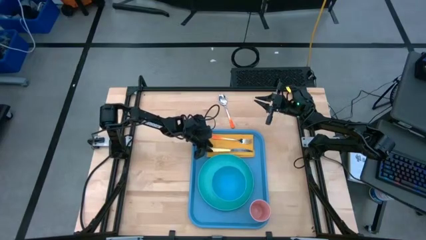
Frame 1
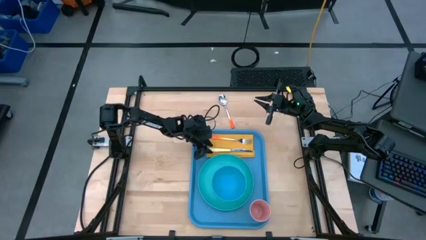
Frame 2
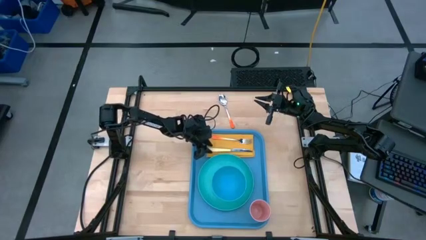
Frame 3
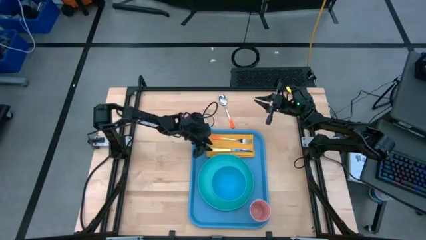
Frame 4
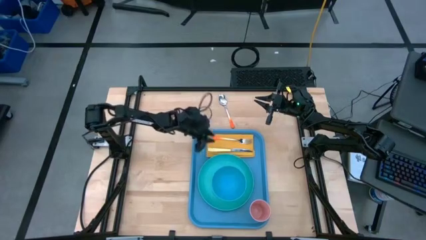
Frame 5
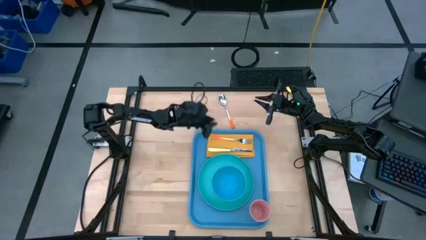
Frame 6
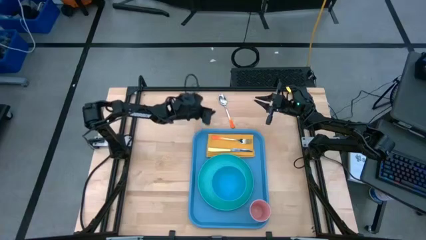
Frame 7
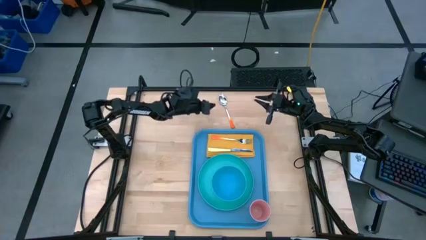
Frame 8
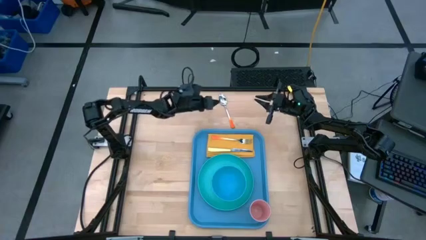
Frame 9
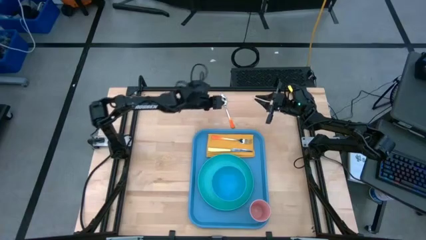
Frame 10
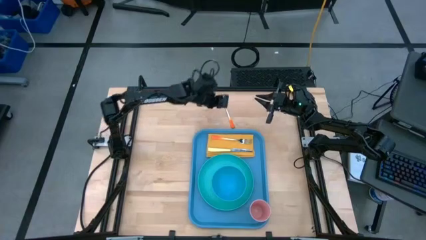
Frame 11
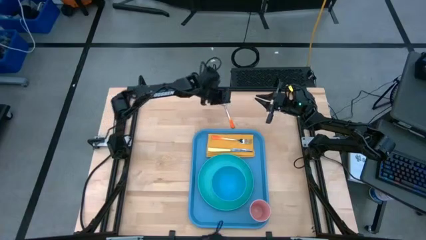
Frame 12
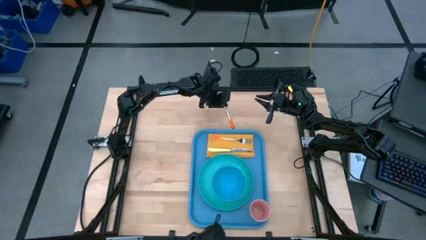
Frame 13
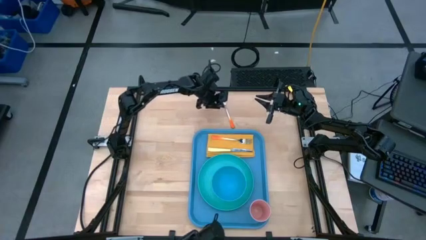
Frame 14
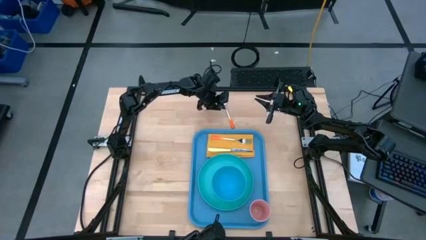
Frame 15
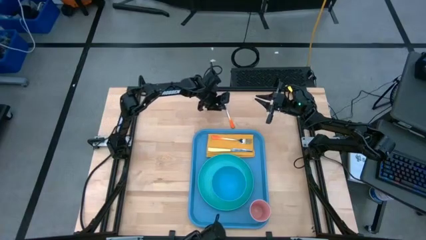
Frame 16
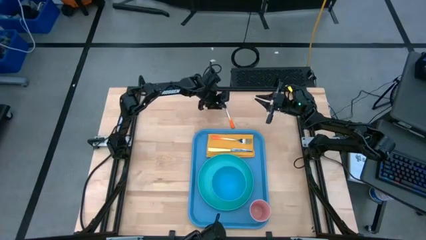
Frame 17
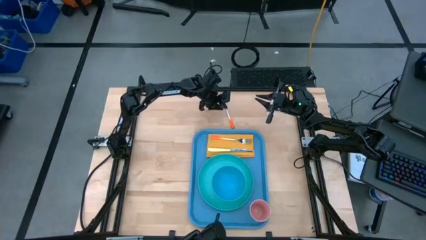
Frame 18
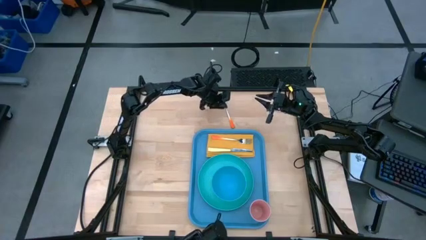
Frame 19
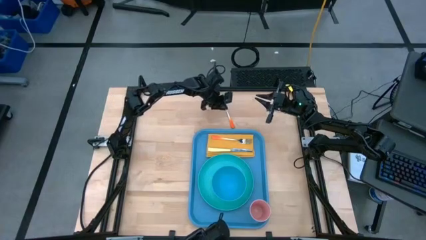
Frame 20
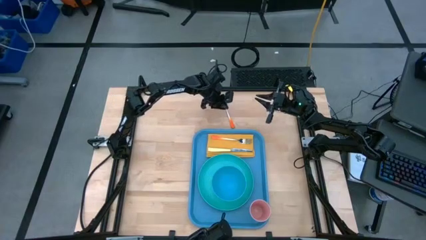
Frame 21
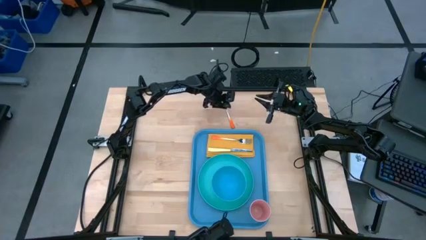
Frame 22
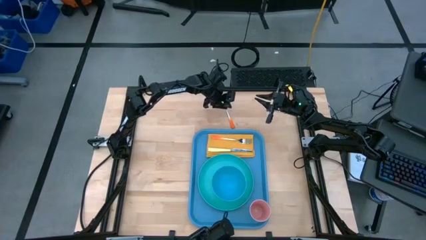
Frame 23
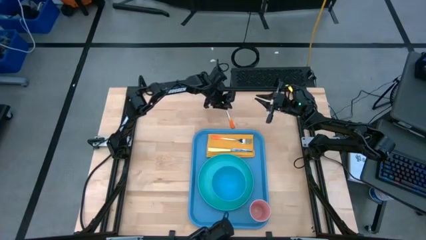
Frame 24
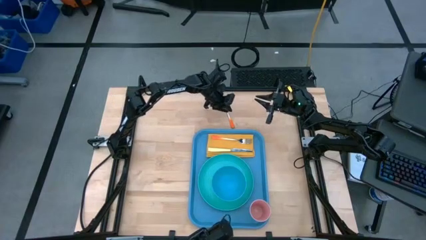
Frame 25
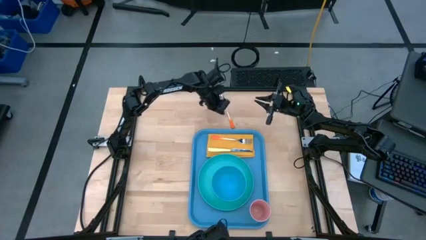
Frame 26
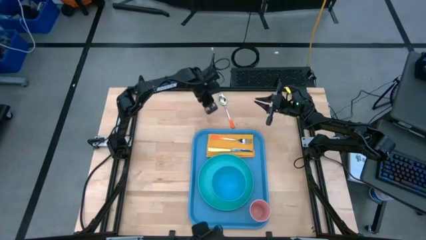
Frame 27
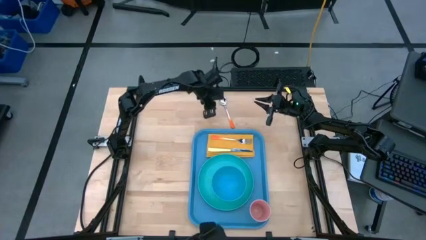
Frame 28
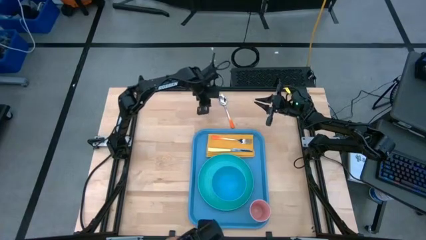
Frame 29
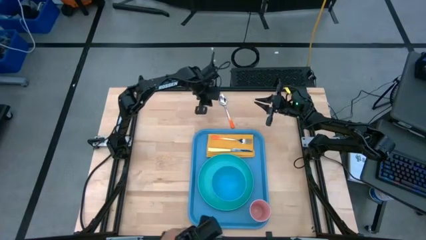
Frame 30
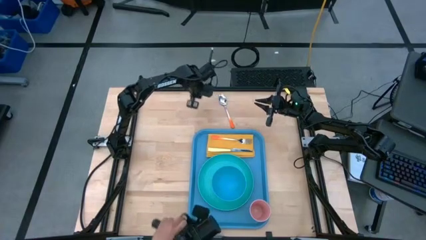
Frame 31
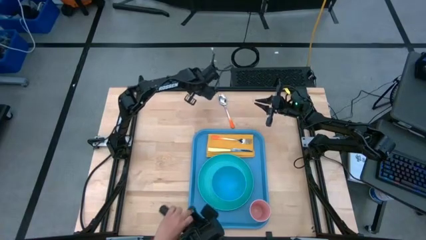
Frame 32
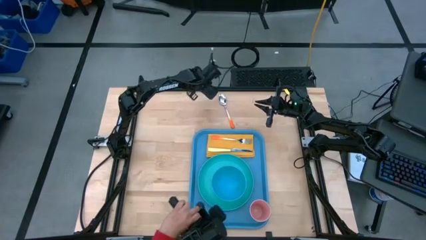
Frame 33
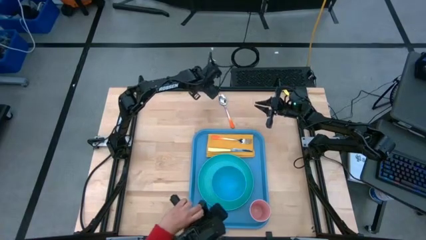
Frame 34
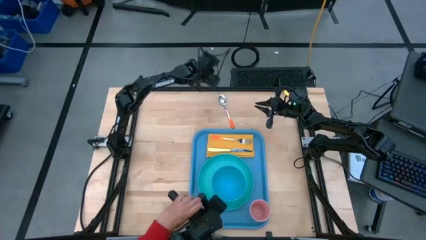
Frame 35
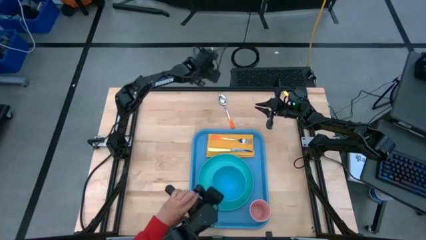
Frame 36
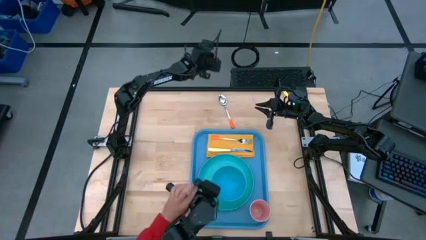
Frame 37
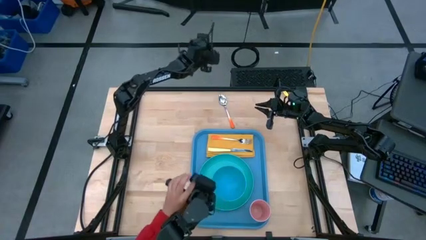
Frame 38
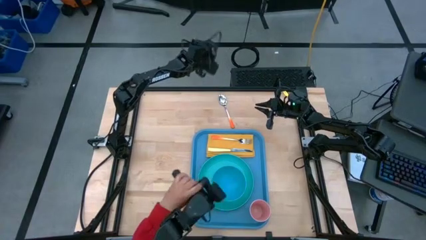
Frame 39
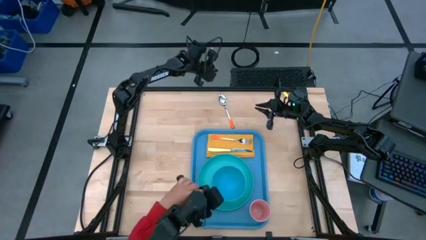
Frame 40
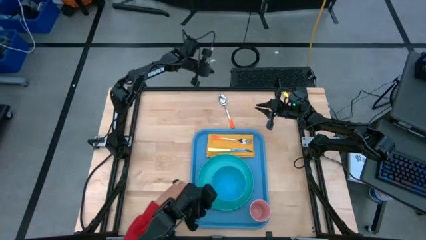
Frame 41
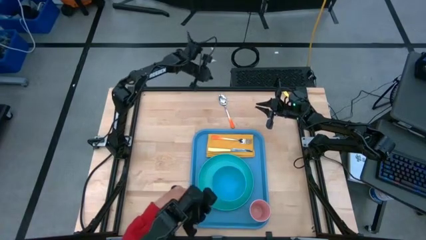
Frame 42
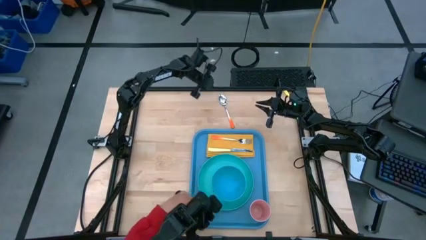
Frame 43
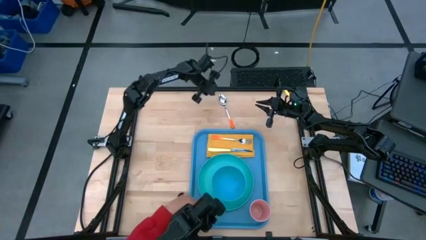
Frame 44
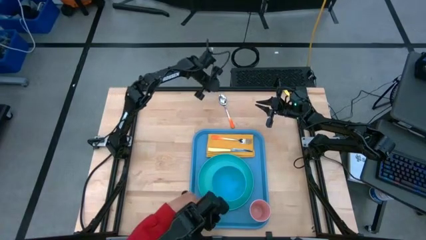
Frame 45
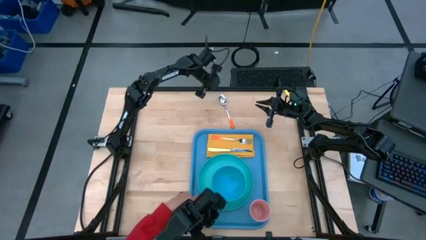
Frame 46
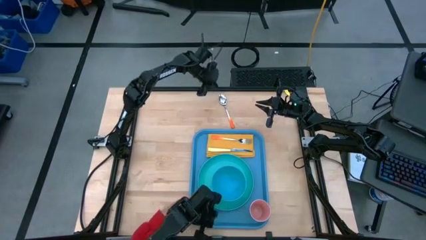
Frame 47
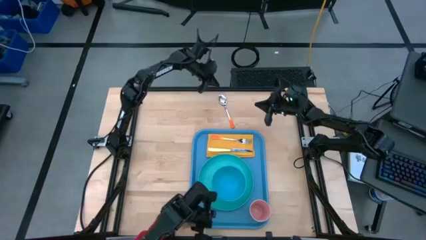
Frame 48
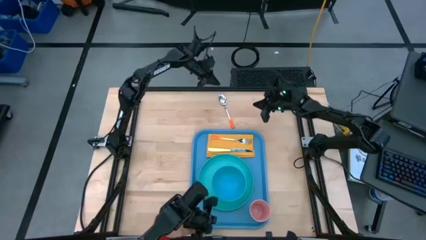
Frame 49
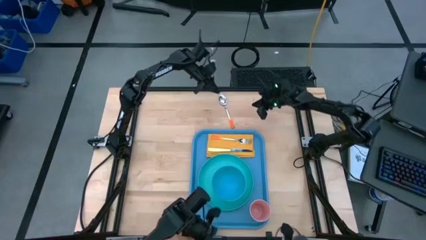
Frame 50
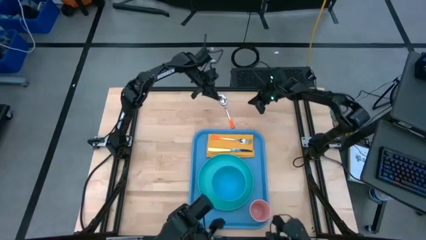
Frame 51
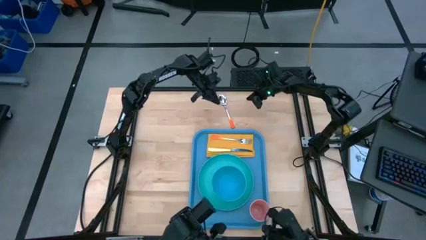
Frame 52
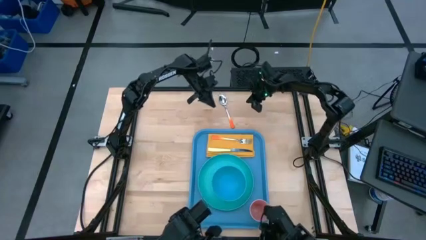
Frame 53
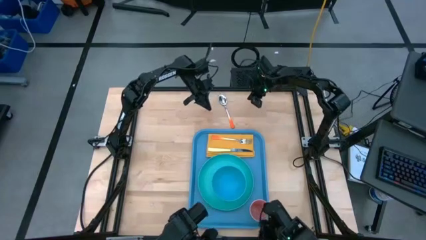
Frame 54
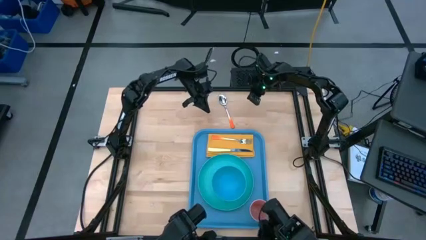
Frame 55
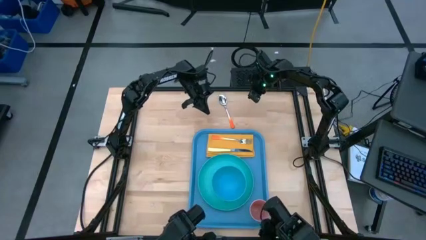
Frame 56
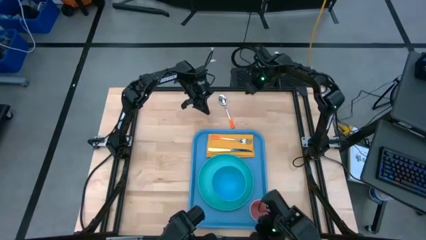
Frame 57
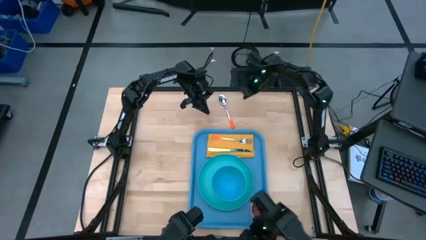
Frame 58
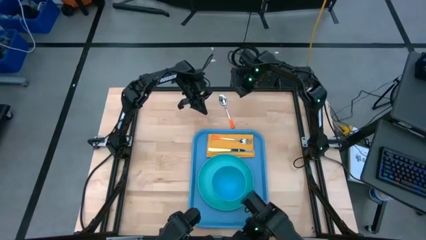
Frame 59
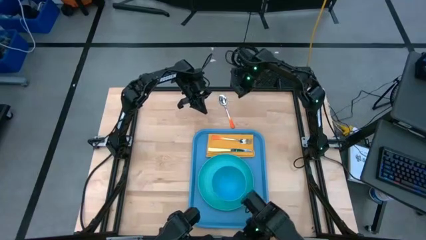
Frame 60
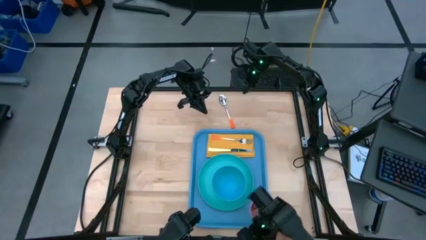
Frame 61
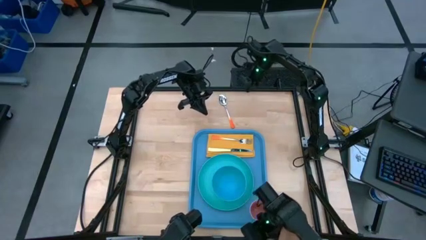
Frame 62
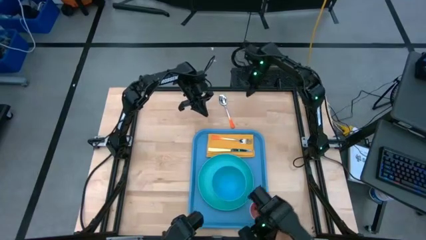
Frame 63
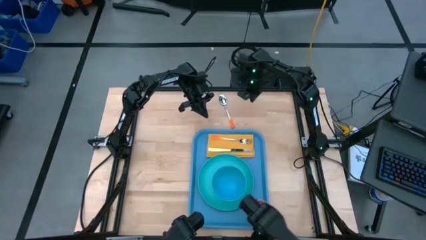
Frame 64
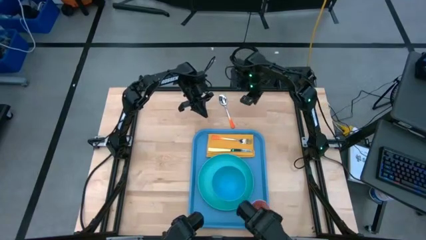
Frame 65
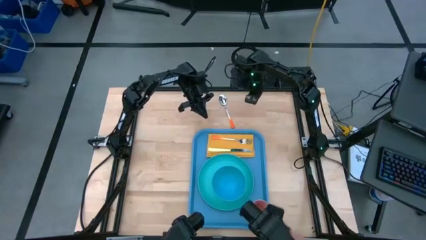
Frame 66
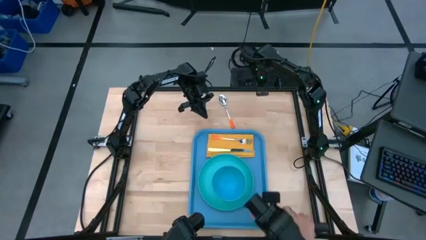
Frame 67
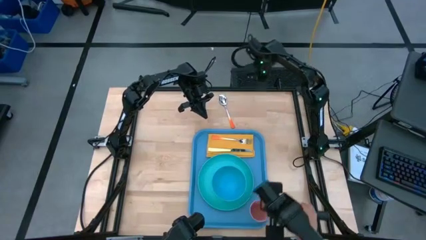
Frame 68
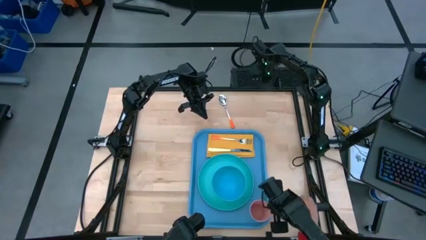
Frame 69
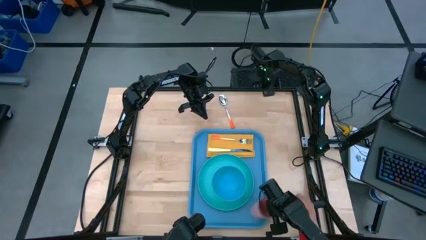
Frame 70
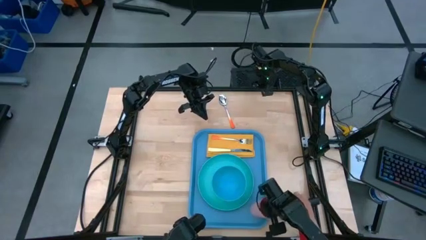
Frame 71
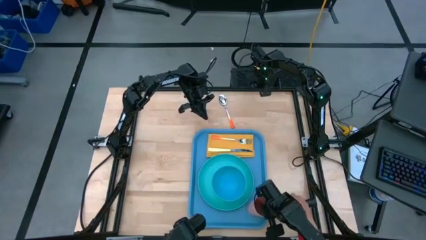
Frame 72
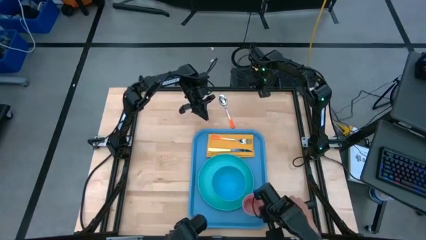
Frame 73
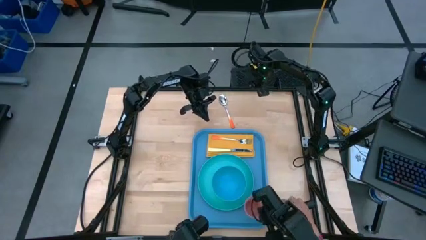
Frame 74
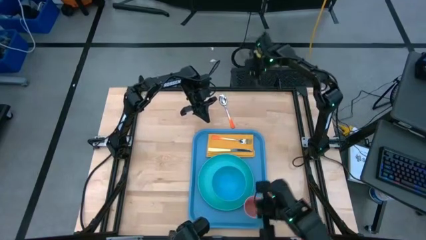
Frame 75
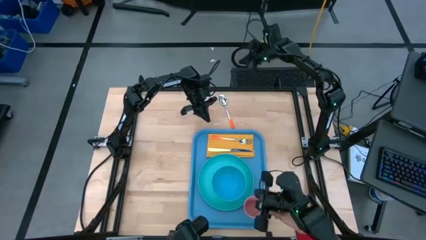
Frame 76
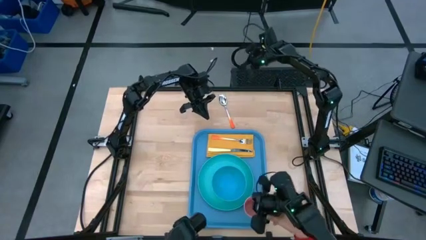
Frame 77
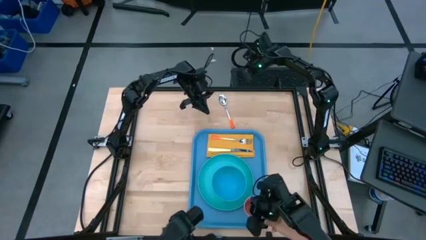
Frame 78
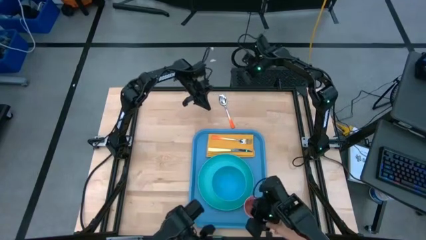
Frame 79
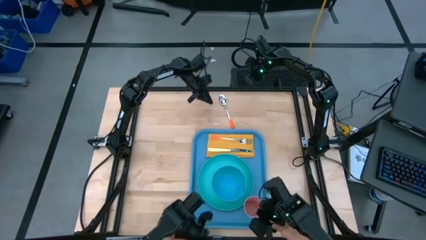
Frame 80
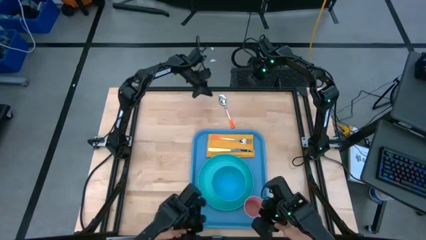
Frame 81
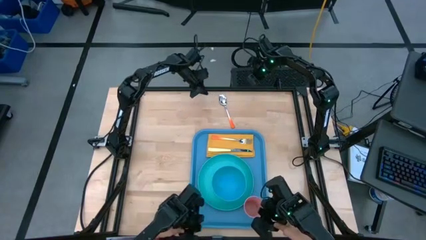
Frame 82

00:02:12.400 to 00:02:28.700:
Task: Set up tray
Adjust the blue serving tray
